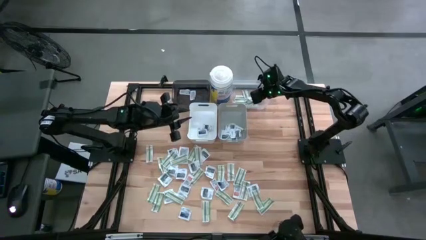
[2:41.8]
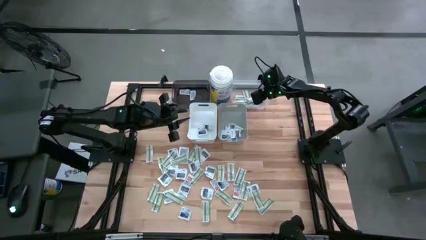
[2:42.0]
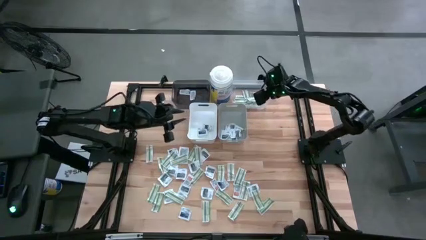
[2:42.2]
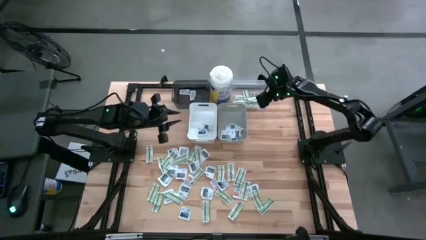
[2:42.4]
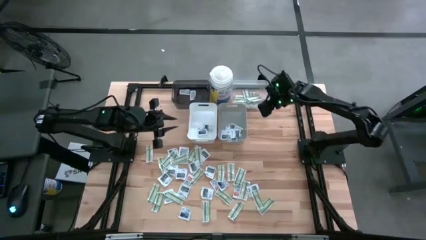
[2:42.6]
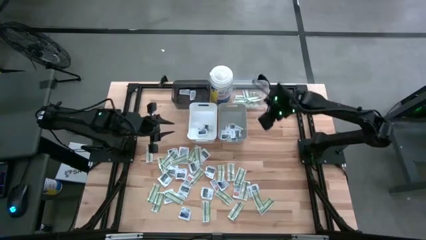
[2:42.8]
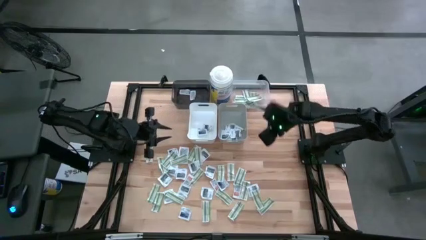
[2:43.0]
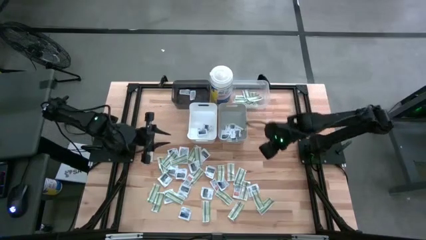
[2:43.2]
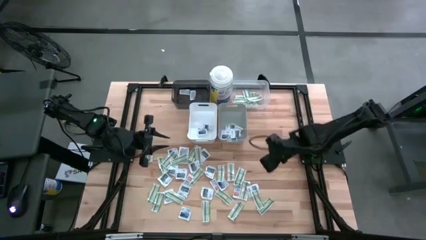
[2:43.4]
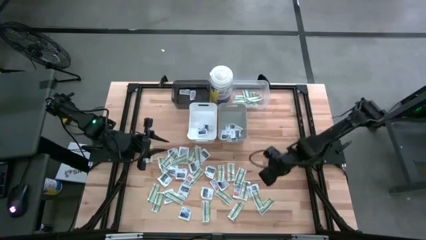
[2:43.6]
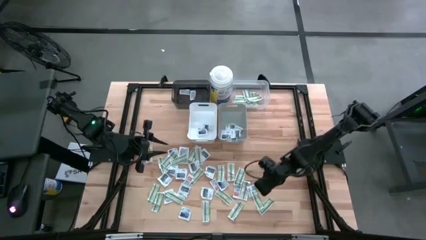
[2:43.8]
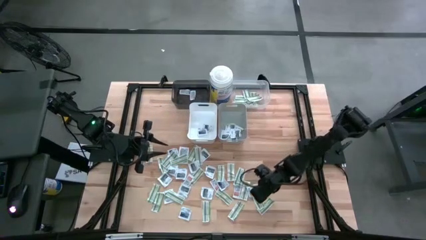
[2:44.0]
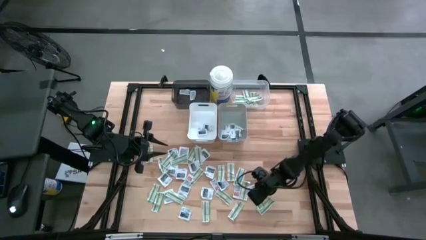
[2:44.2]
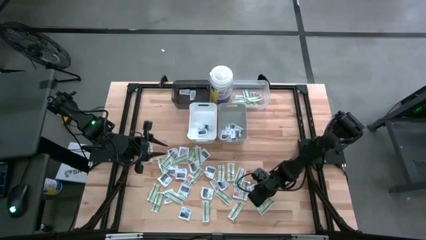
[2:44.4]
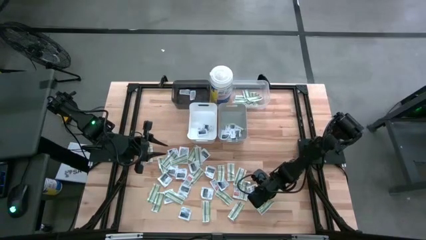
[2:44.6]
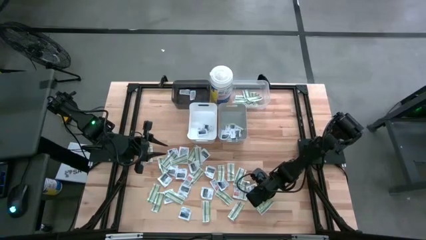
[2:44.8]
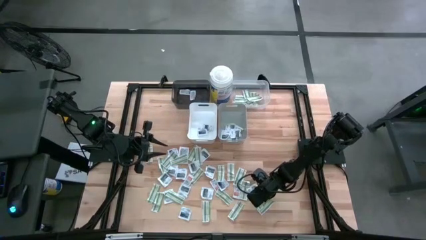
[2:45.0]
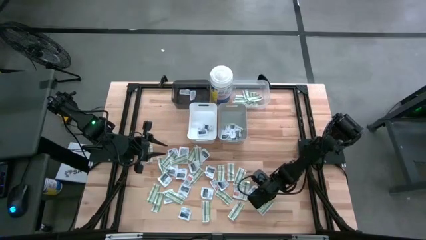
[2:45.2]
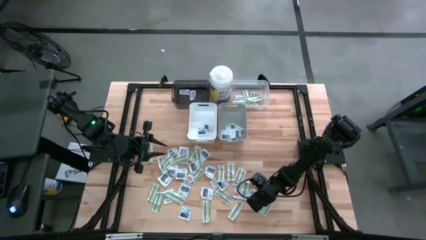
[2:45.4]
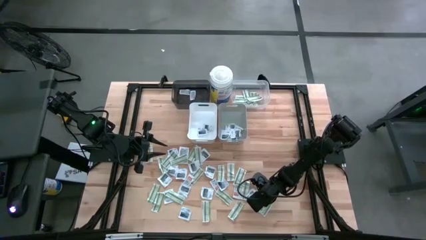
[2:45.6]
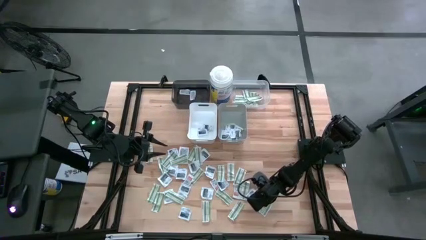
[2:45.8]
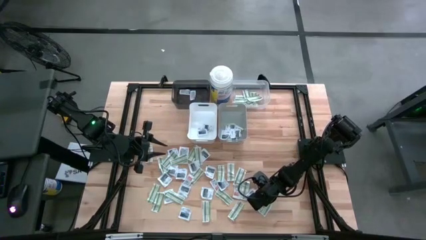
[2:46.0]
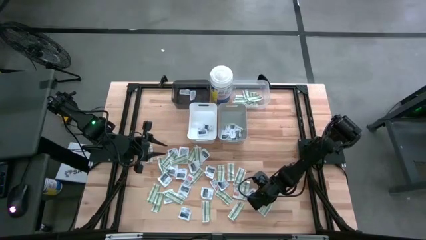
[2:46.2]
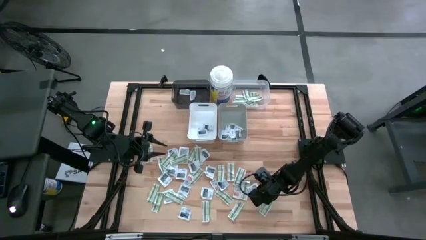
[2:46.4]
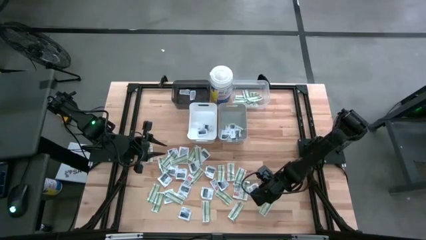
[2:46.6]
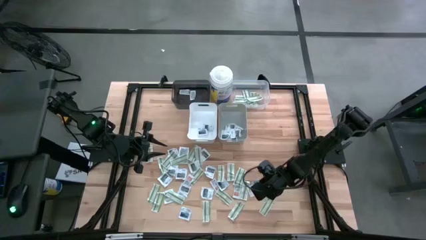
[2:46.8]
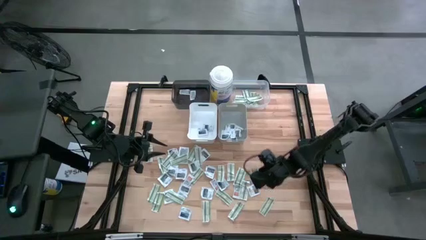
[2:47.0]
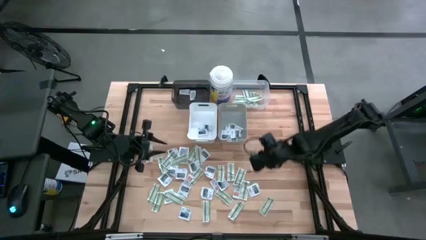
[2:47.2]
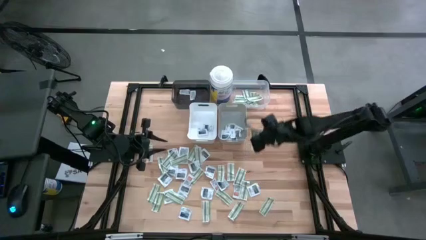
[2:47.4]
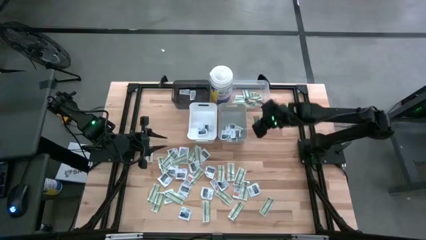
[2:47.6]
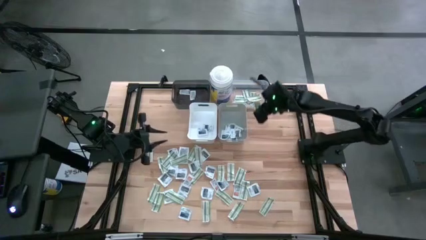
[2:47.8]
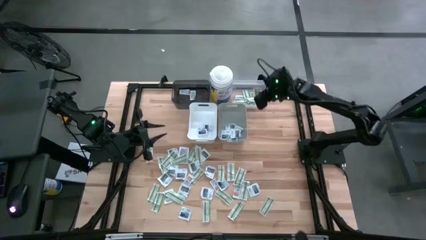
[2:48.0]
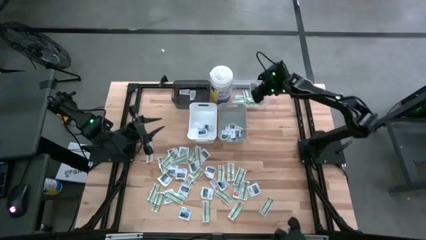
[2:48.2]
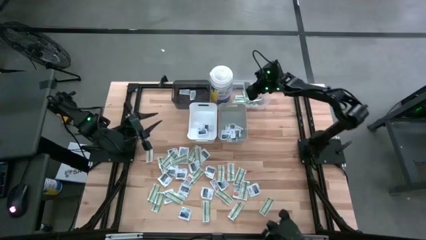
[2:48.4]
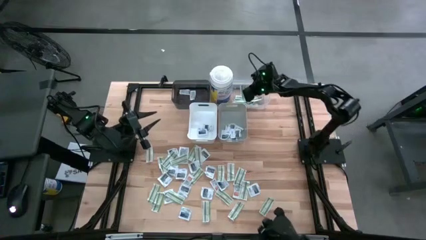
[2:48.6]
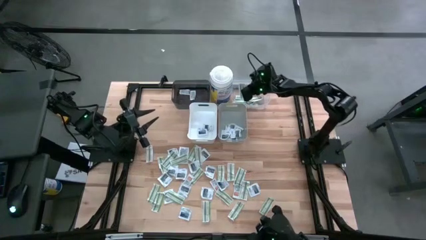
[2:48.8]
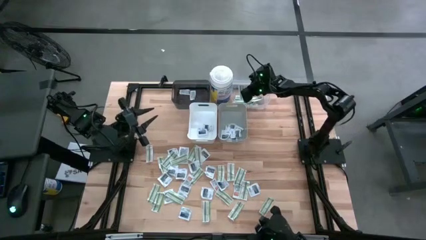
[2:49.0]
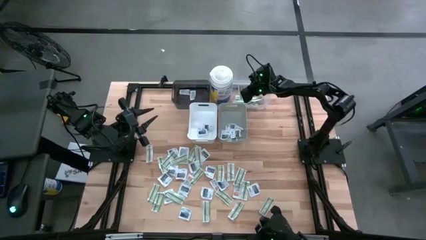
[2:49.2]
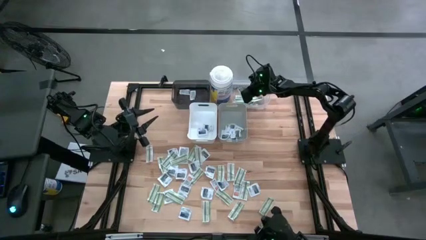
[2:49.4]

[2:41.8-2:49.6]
Task: Pick & Place First Aid Supplies
Put the band aid into the transparent bin

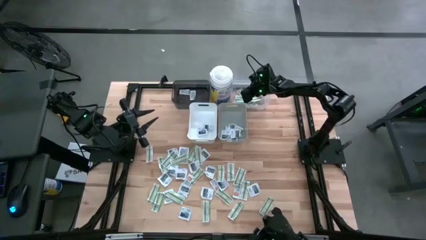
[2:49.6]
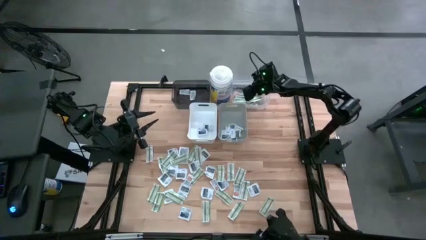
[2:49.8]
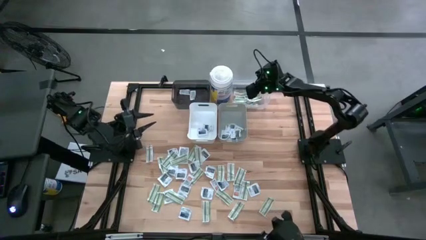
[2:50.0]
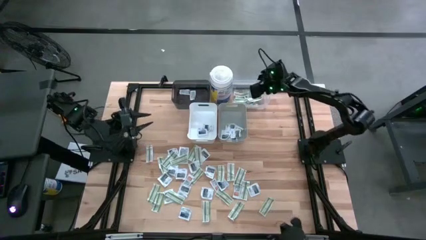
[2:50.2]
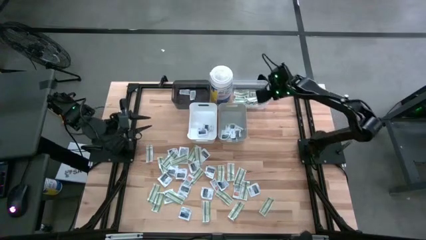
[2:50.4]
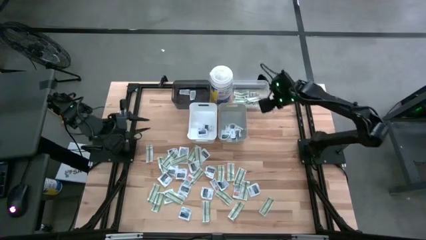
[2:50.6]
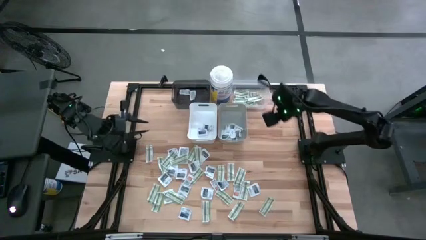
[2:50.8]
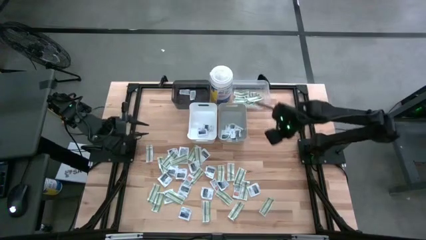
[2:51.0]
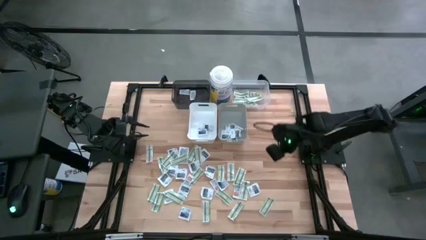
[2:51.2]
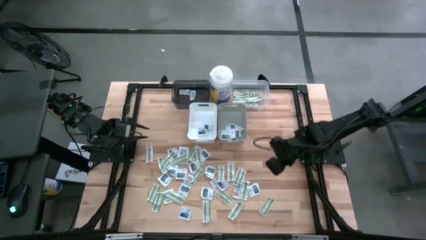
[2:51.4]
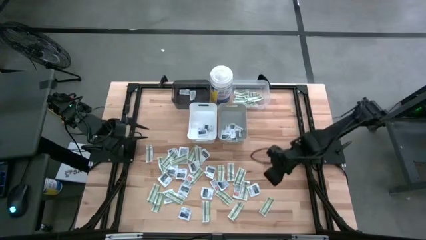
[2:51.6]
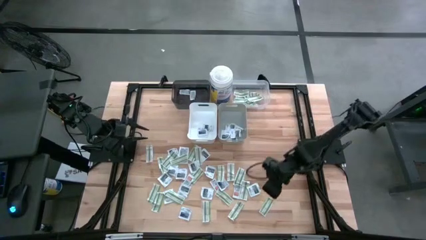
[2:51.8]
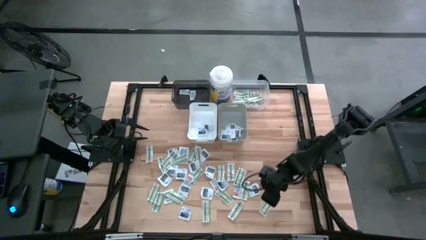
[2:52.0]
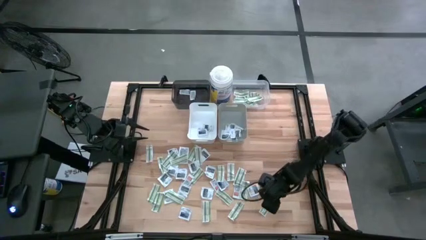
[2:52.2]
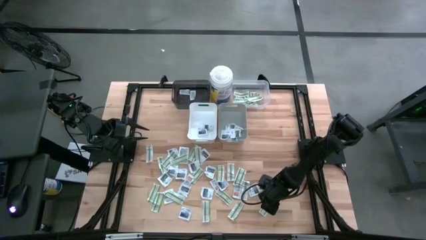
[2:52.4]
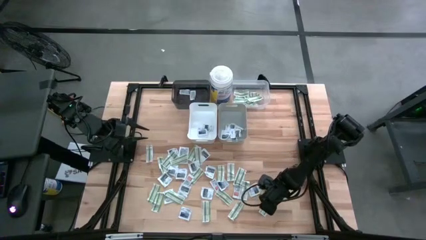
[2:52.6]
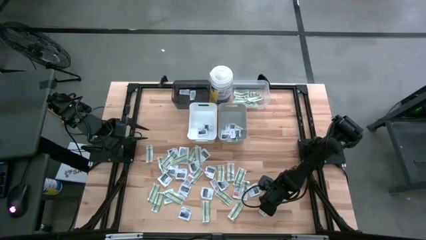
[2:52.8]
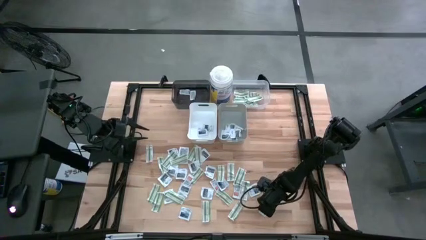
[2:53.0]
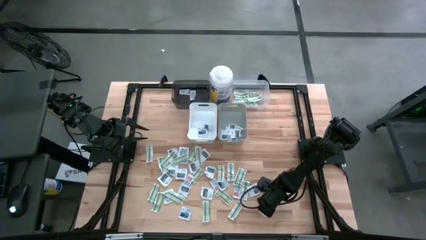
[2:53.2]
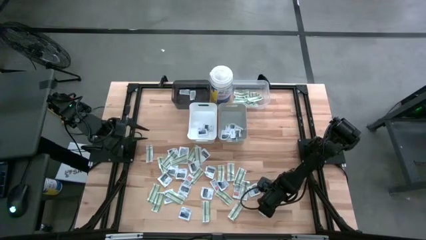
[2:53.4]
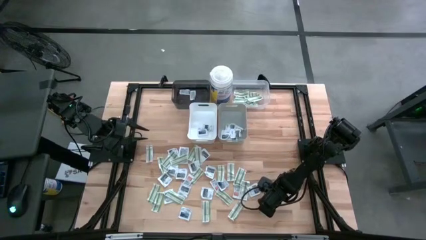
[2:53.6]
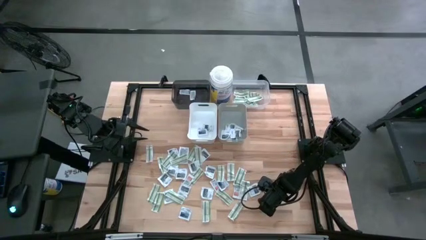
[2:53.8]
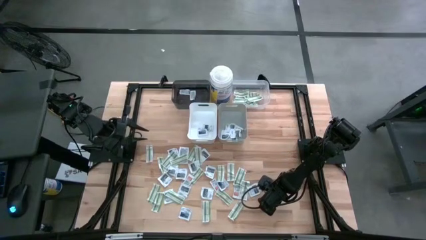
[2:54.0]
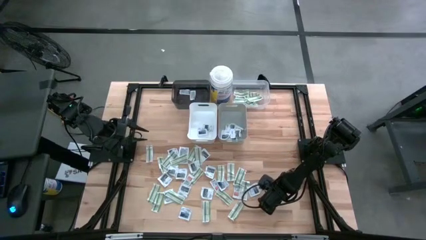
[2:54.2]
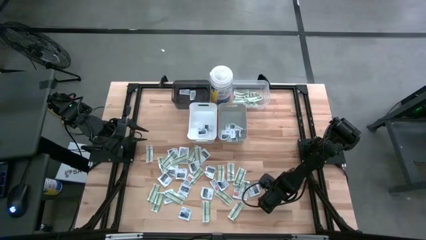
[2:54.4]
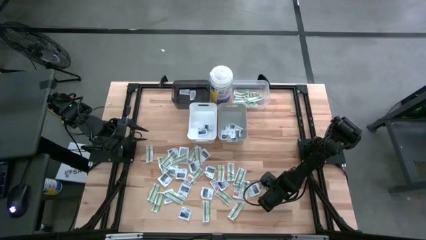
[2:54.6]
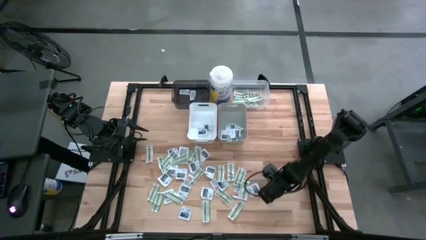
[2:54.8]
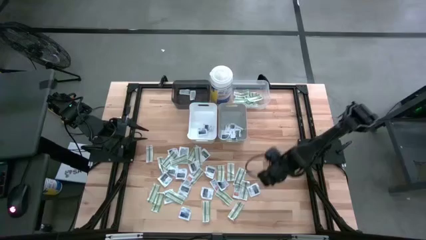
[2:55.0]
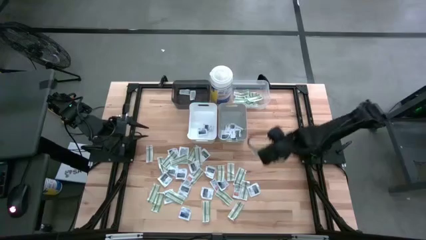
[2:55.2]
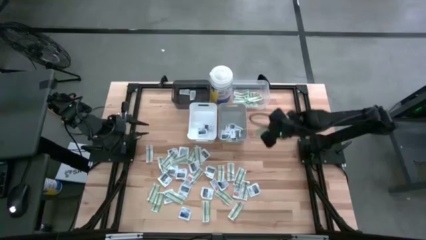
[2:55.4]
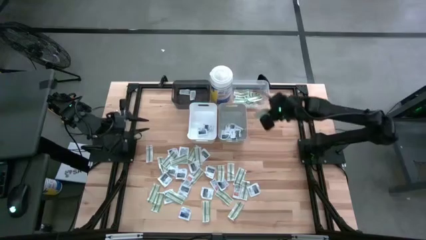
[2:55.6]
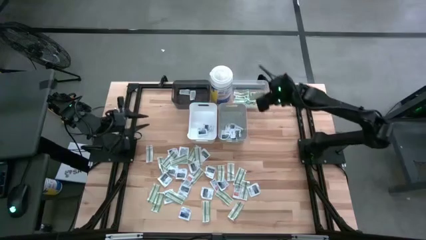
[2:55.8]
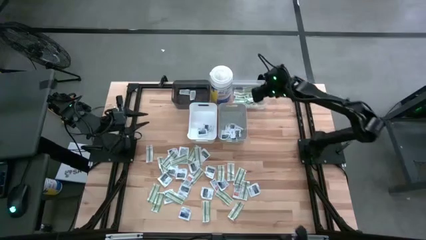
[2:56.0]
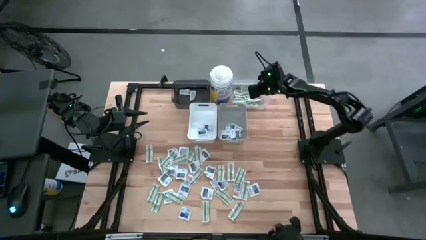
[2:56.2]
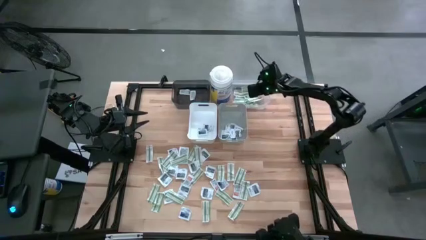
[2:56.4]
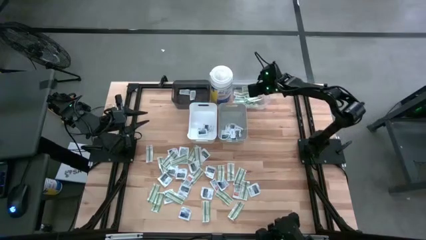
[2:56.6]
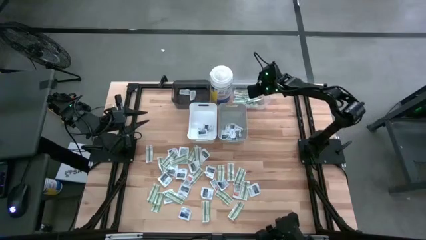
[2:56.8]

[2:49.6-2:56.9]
Put the band aid into the transparent bin
